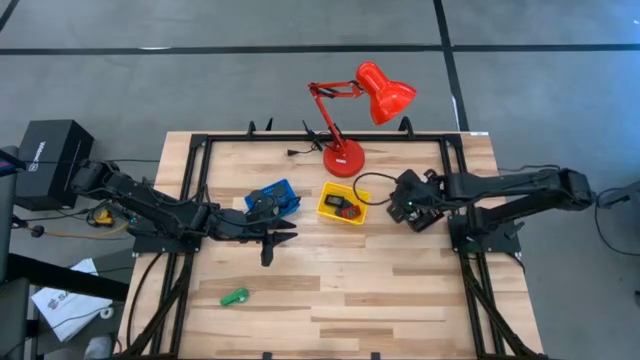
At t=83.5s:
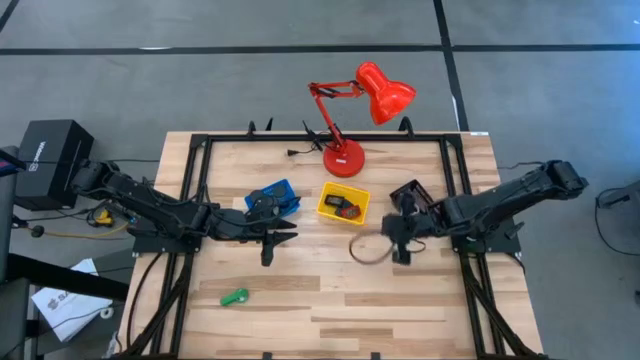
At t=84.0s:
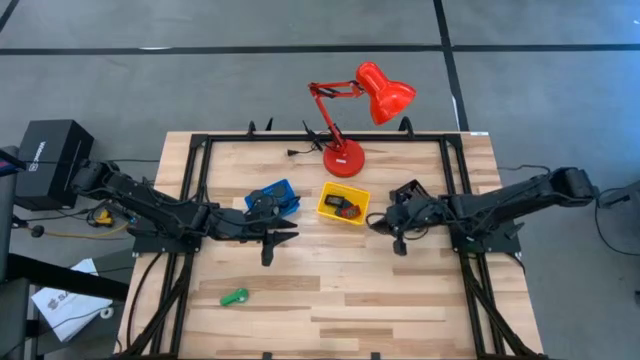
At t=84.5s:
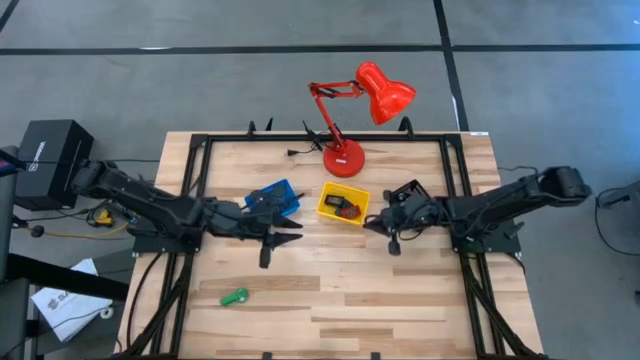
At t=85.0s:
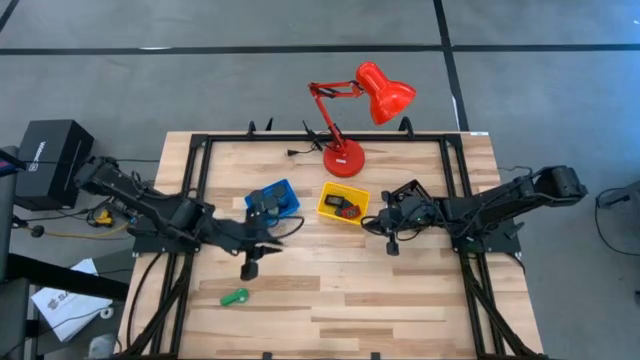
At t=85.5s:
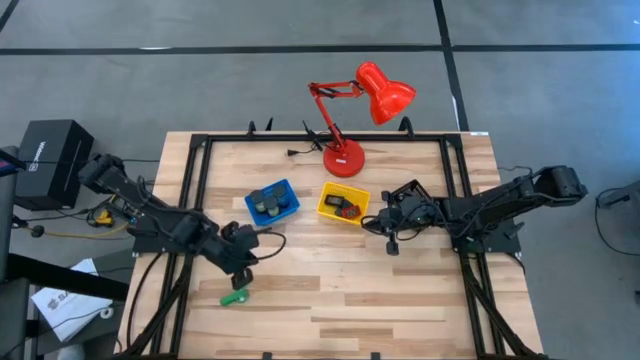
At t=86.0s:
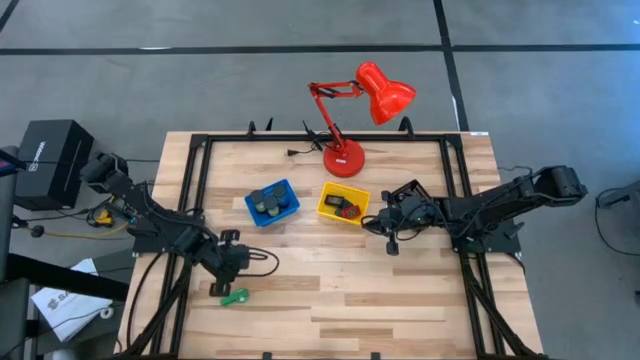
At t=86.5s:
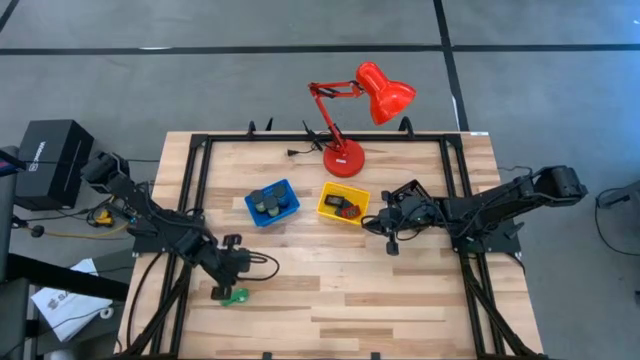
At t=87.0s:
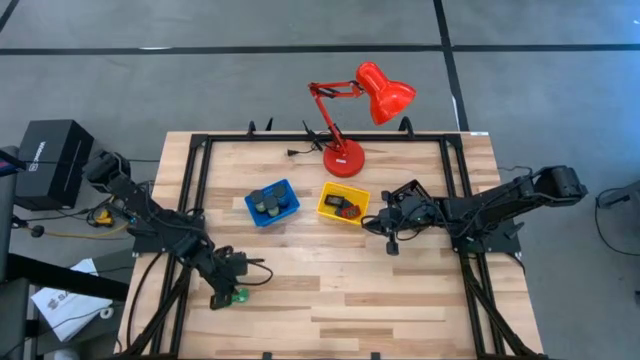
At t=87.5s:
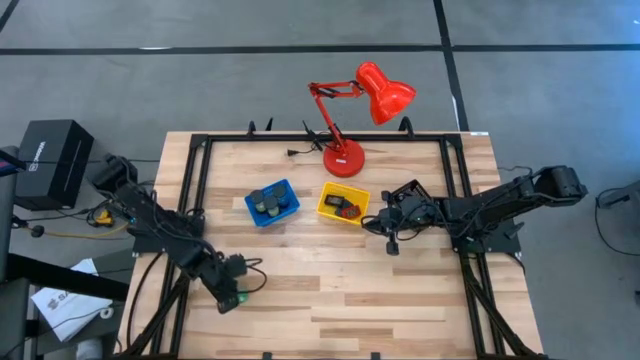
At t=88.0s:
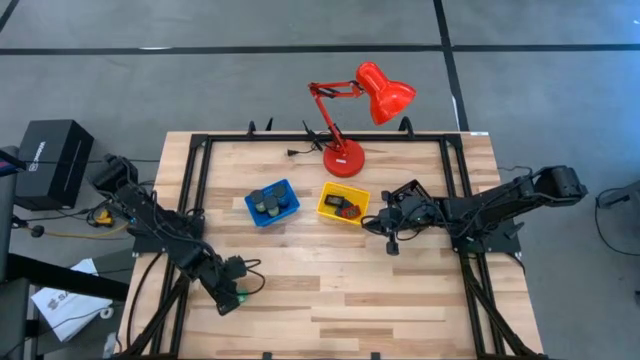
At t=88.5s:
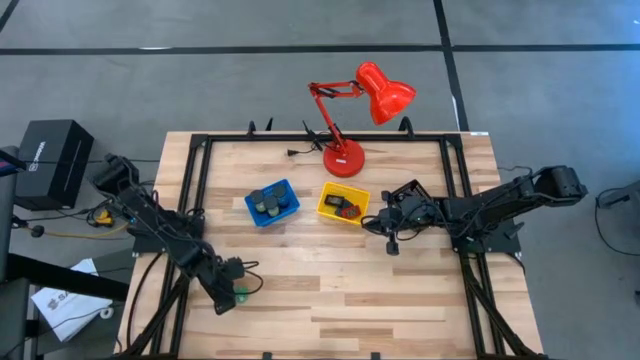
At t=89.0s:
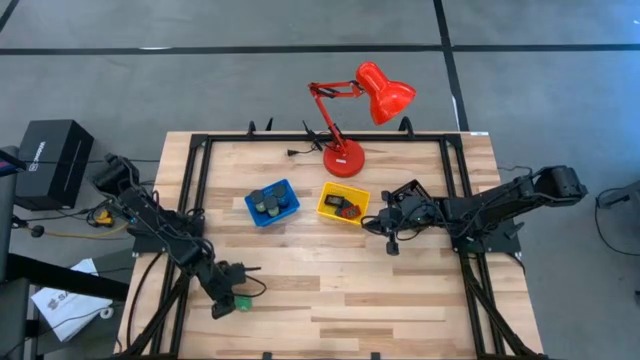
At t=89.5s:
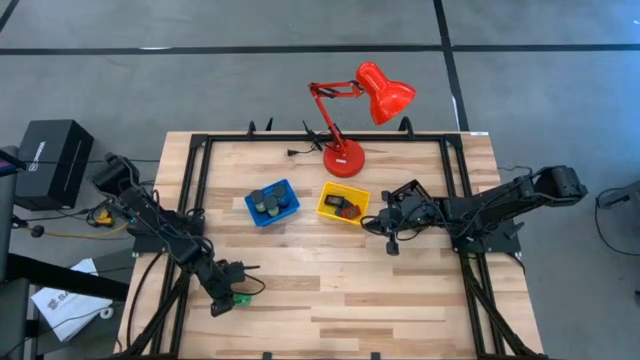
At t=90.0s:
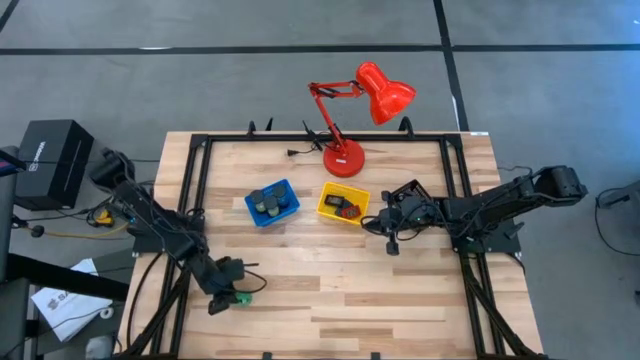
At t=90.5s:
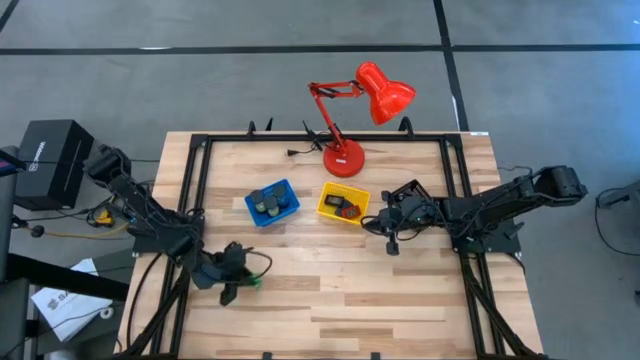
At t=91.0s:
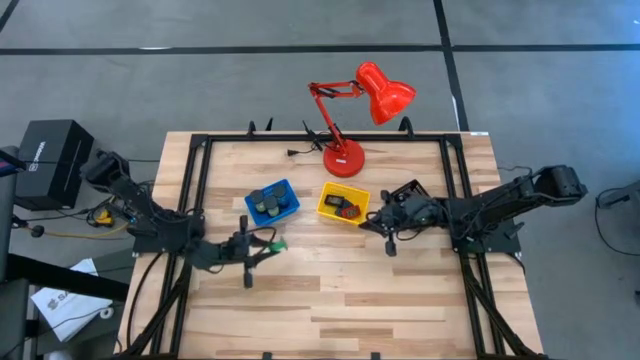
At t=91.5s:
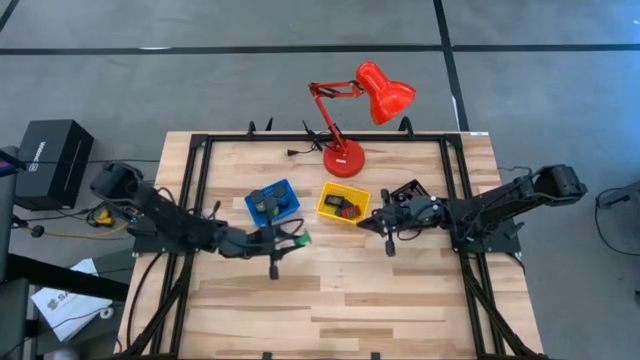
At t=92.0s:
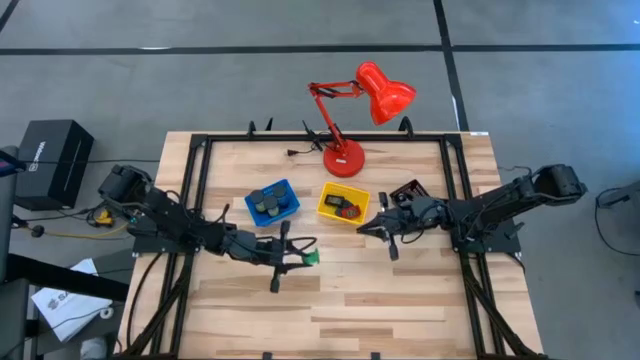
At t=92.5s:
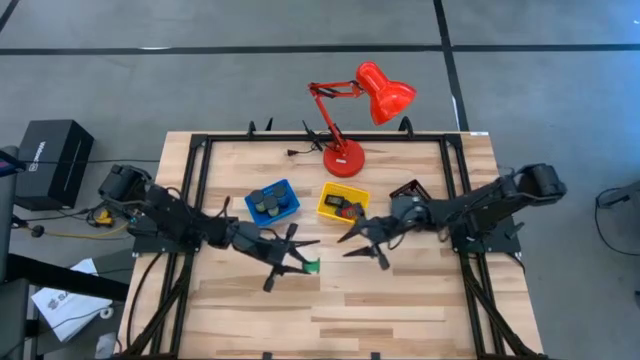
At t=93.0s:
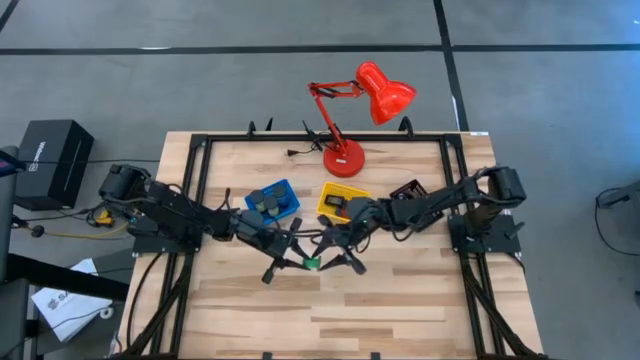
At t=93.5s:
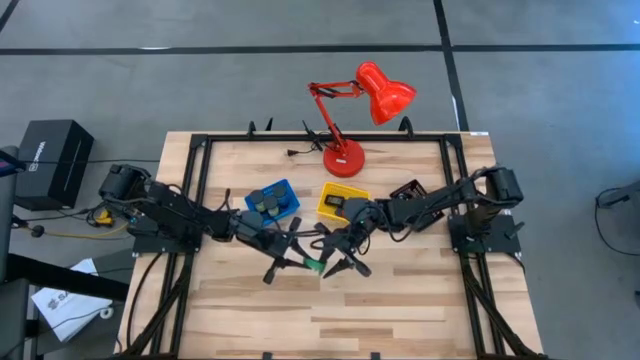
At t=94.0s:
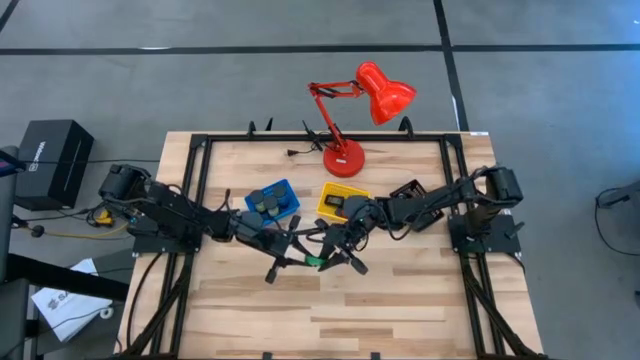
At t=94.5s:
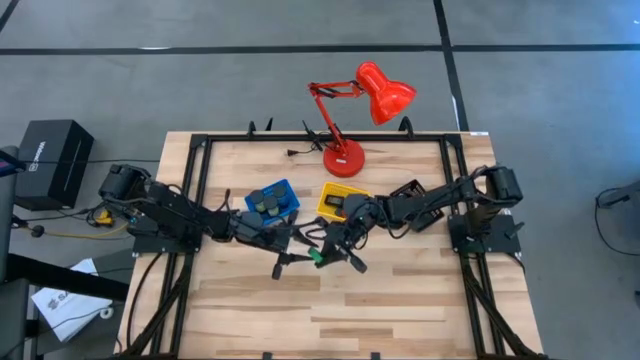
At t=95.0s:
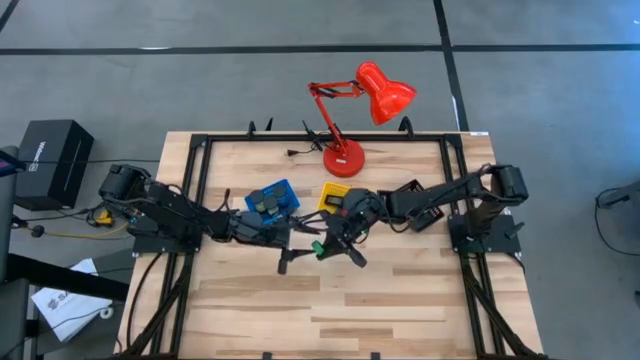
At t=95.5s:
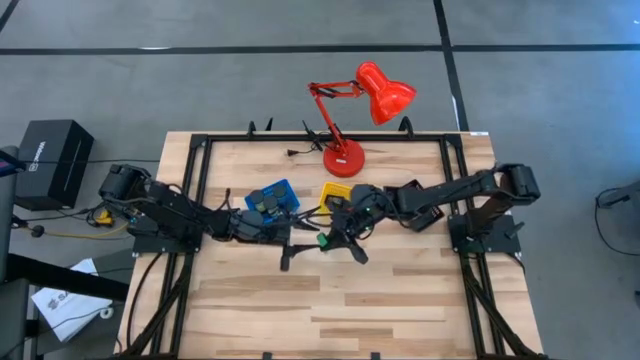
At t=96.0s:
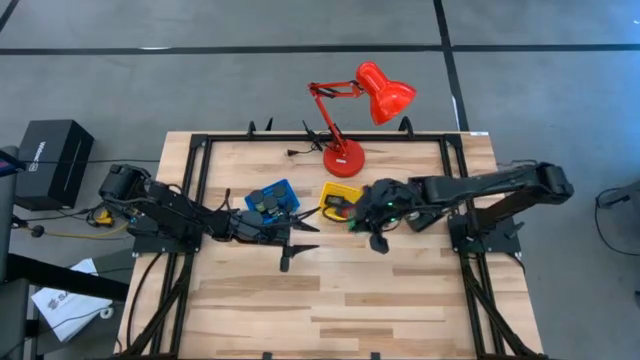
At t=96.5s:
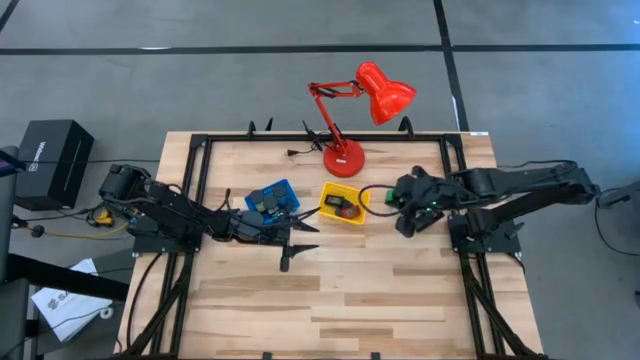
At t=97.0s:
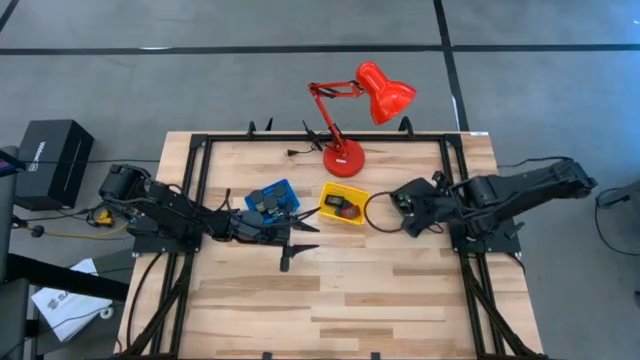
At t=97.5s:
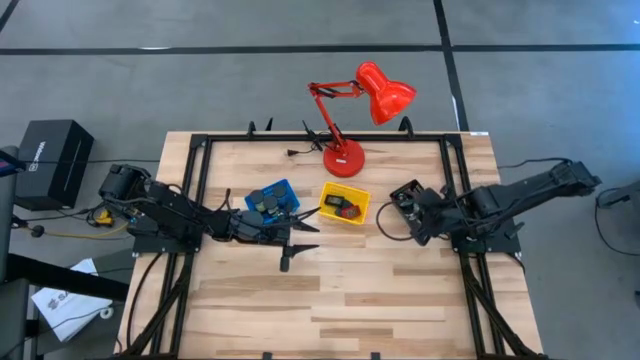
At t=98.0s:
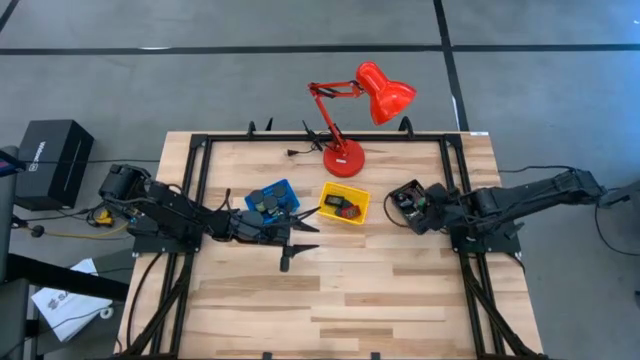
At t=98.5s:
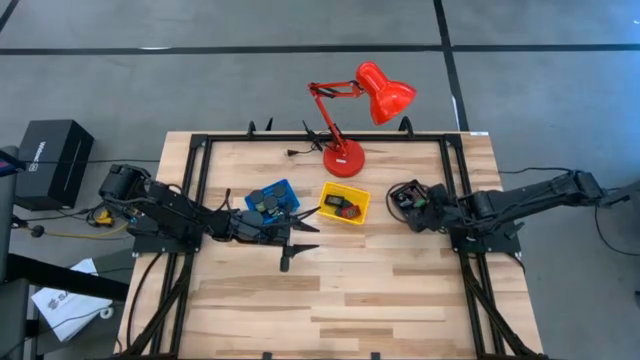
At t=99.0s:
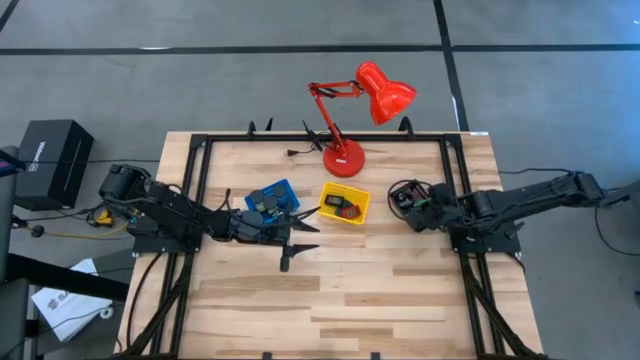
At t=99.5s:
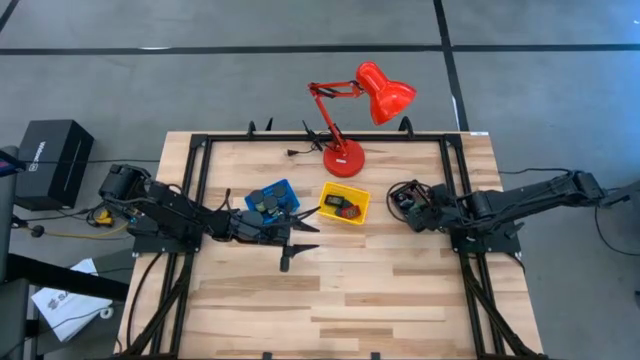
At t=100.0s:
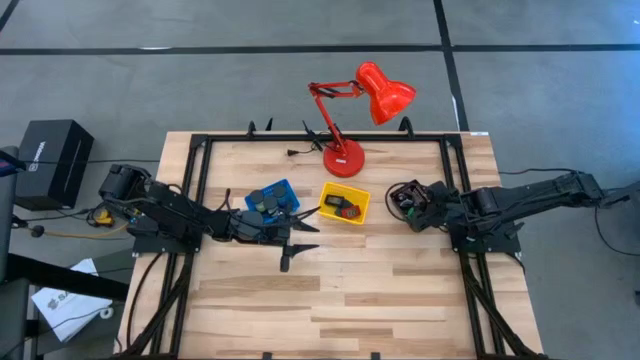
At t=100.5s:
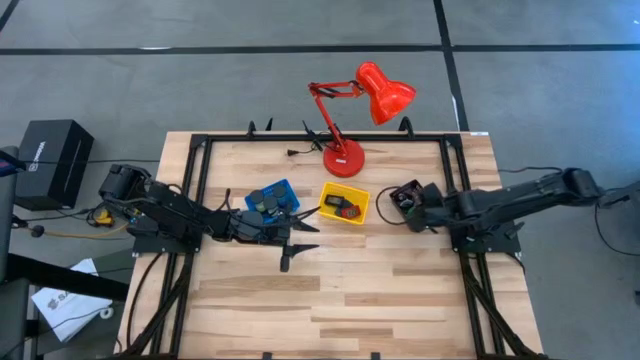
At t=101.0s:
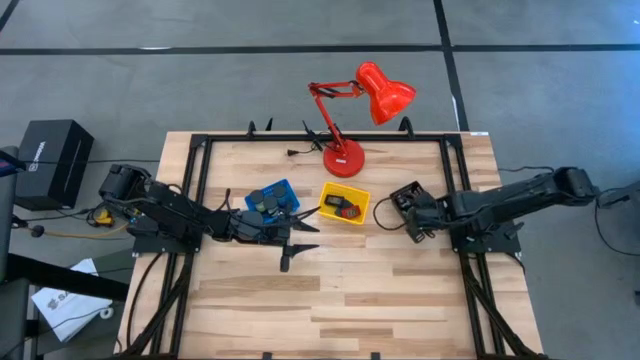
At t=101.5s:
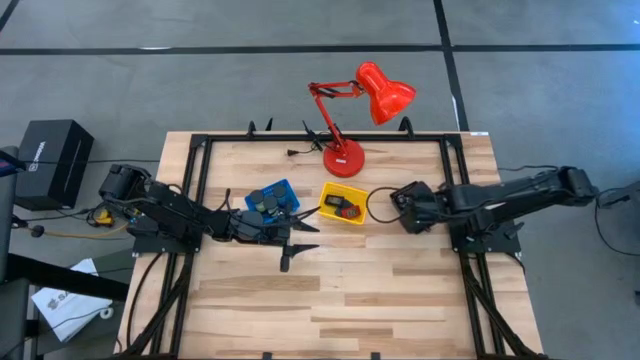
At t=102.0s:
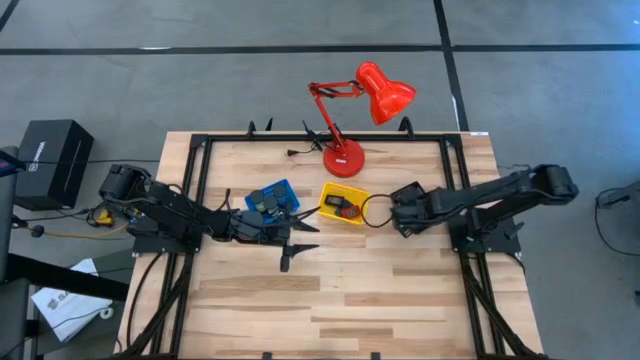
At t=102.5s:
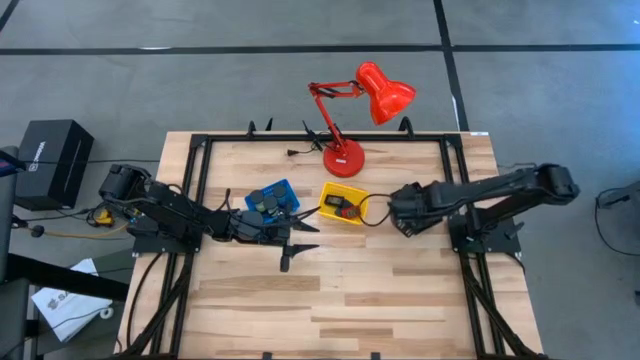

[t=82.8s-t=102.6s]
Task: Pick & Place Office items
Put the green wrist watch into the black bin

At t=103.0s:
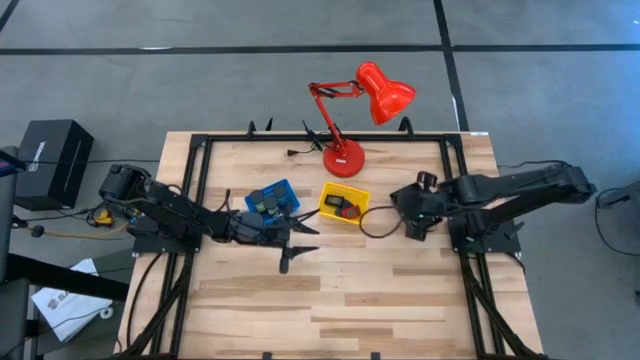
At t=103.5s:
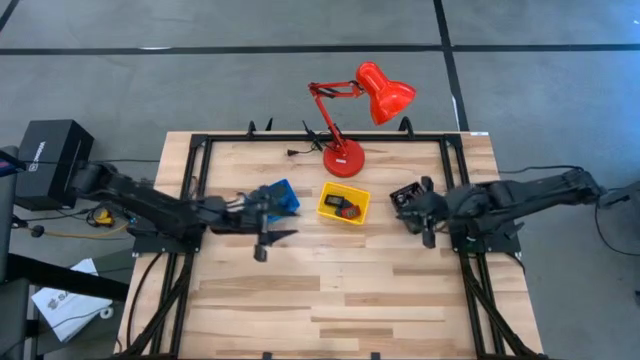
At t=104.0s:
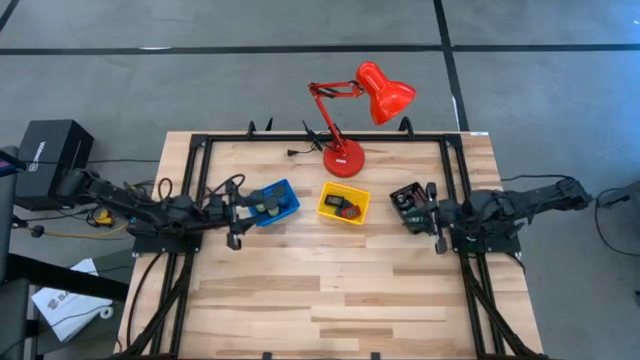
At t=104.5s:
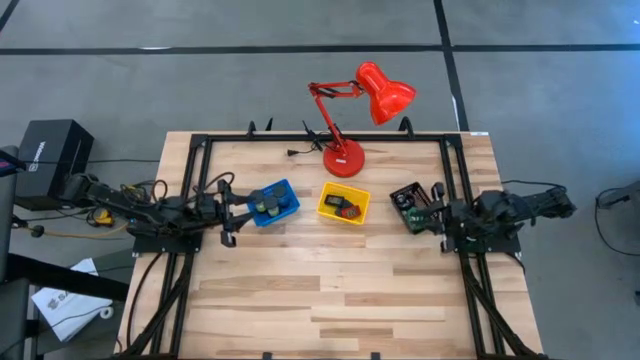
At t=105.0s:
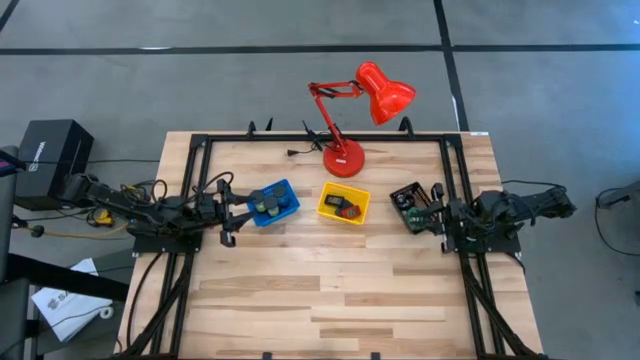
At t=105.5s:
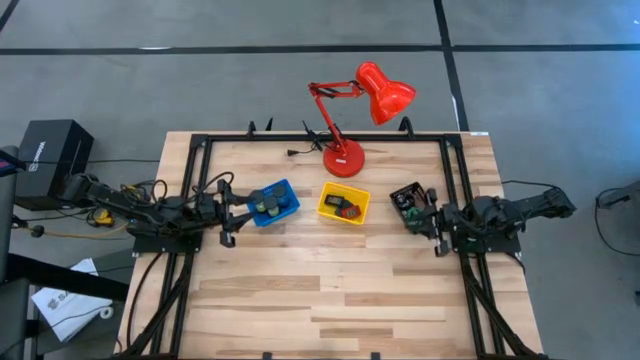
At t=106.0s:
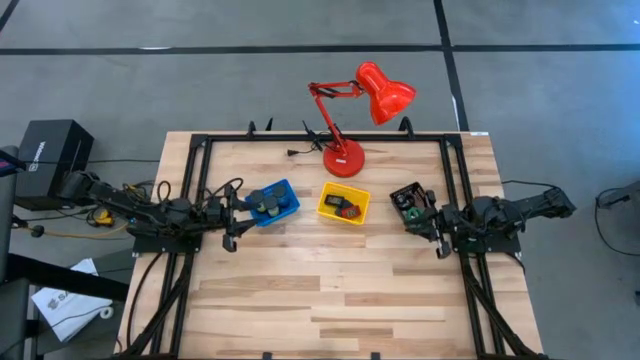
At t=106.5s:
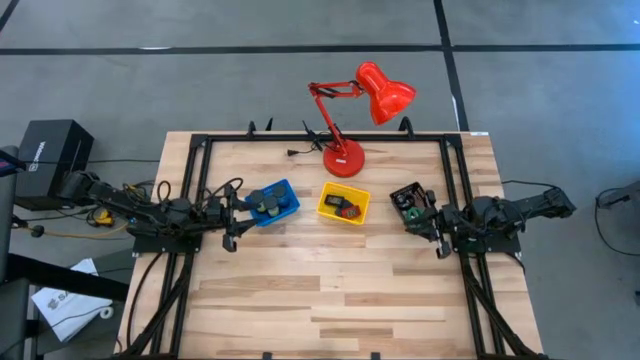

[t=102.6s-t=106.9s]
Return to Home Position
